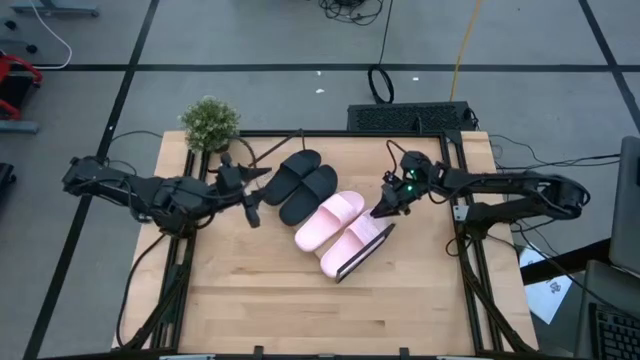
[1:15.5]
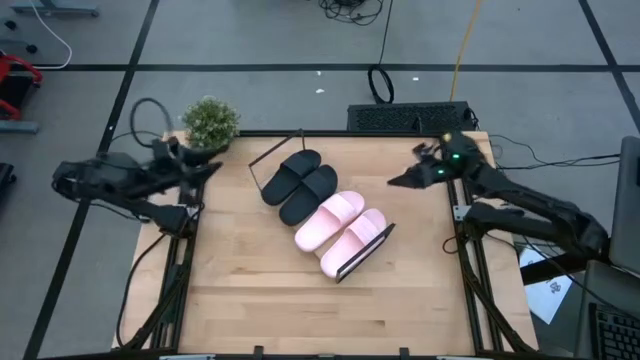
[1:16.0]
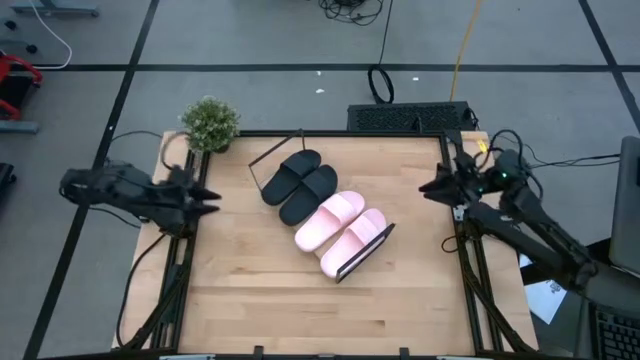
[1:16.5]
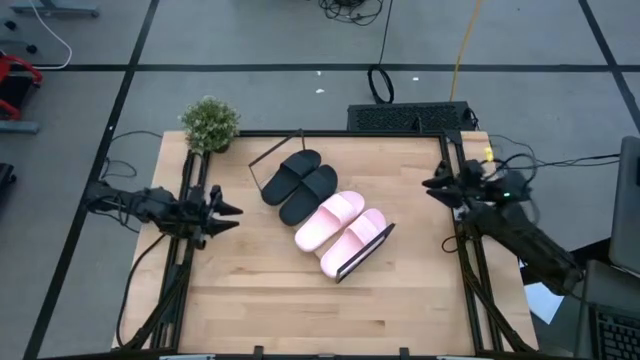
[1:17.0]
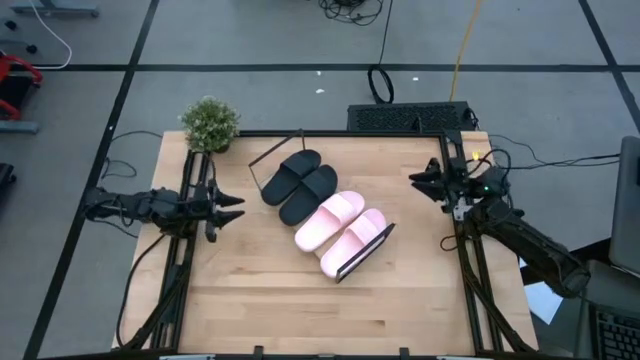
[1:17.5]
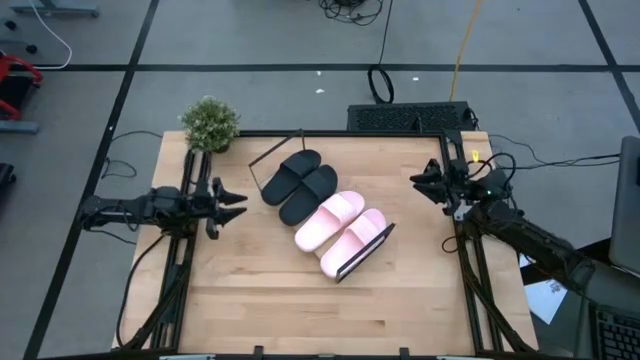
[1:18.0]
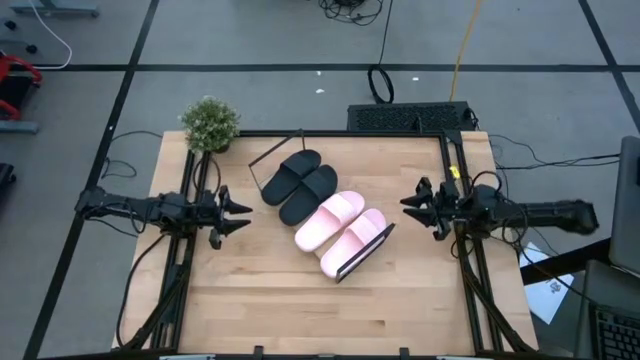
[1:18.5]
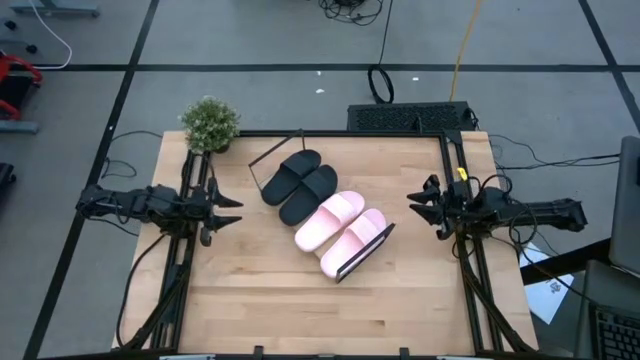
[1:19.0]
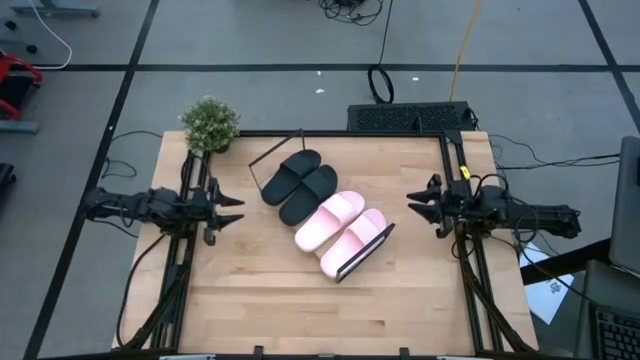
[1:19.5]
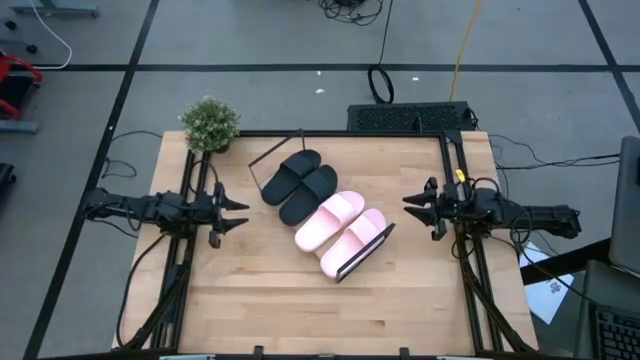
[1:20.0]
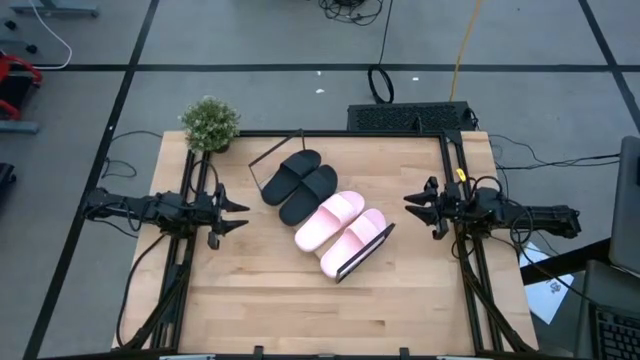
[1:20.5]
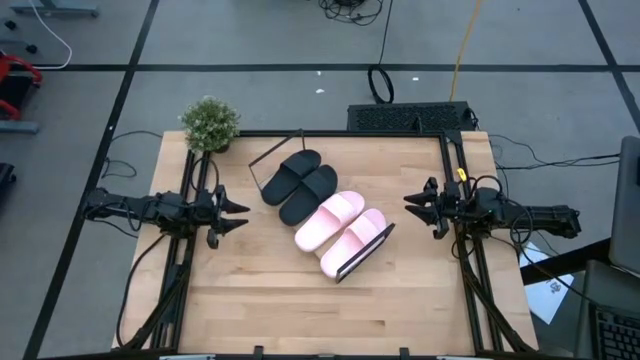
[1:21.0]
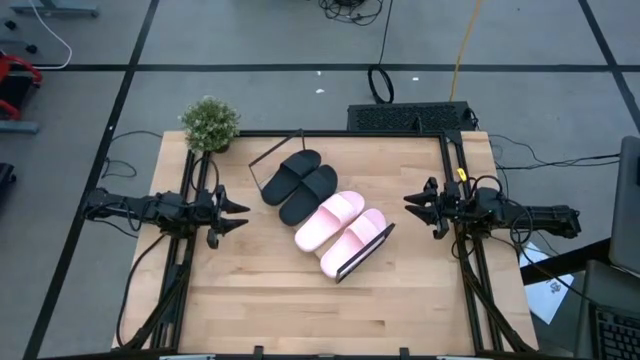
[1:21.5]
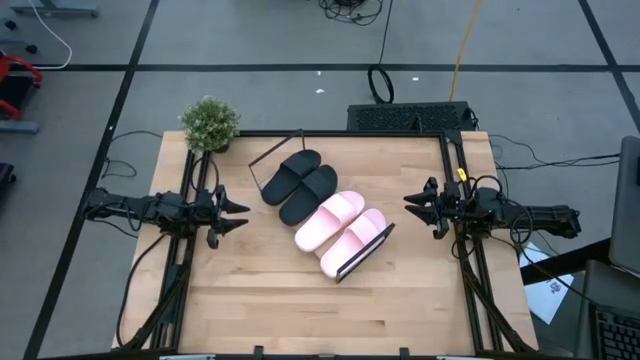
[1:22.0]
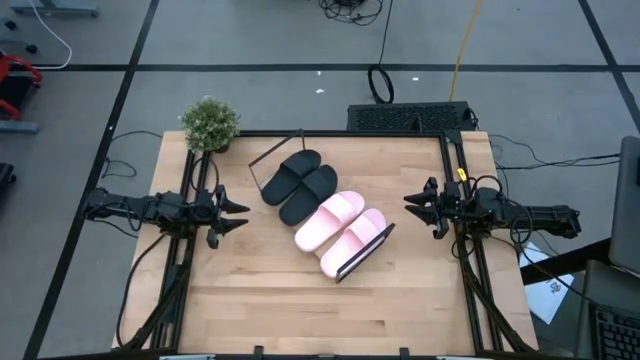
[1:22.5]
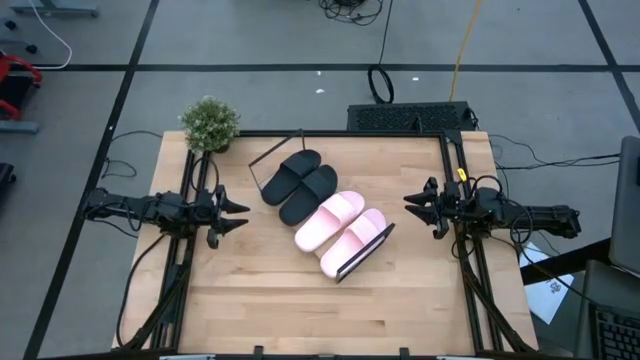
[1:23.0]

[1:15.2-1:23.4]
Task: Pick and place slides into the shelf
Return to Home Position

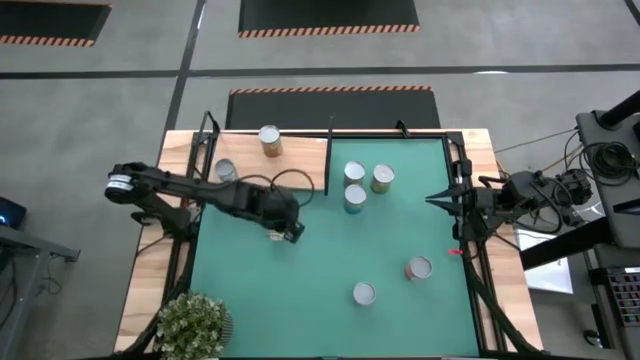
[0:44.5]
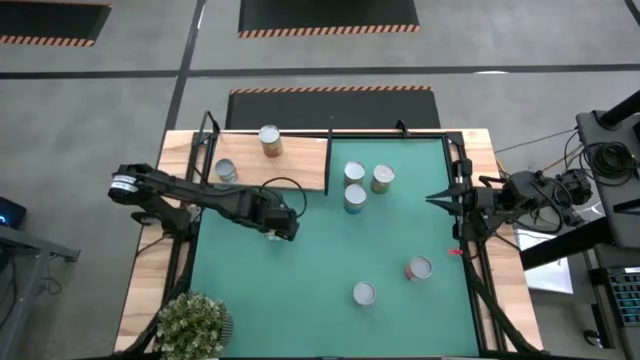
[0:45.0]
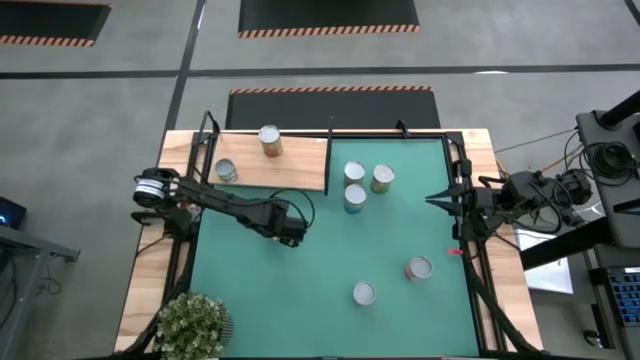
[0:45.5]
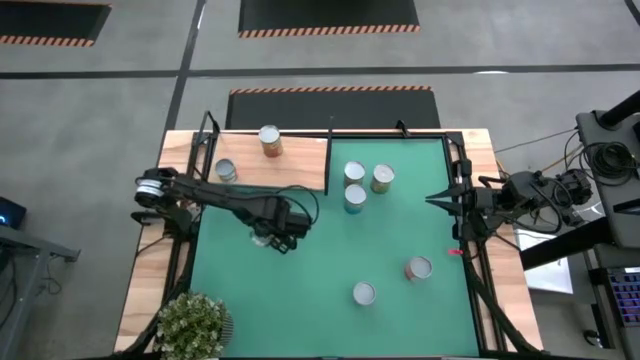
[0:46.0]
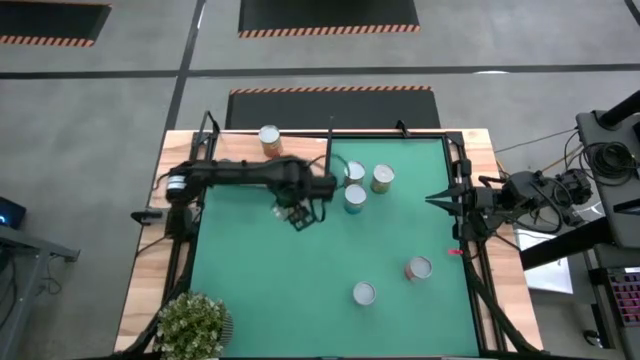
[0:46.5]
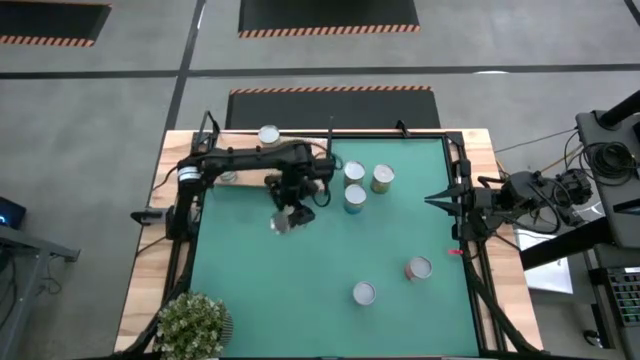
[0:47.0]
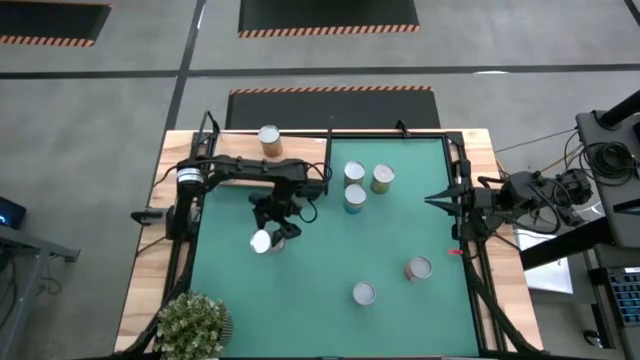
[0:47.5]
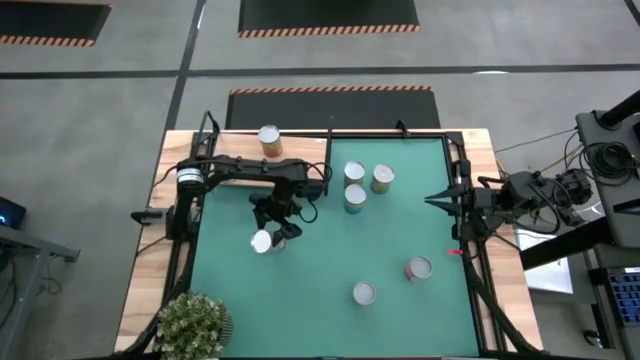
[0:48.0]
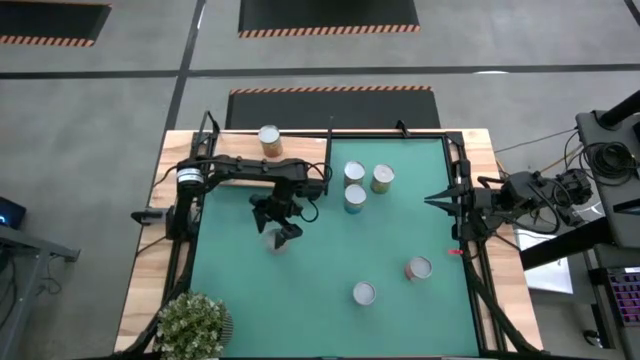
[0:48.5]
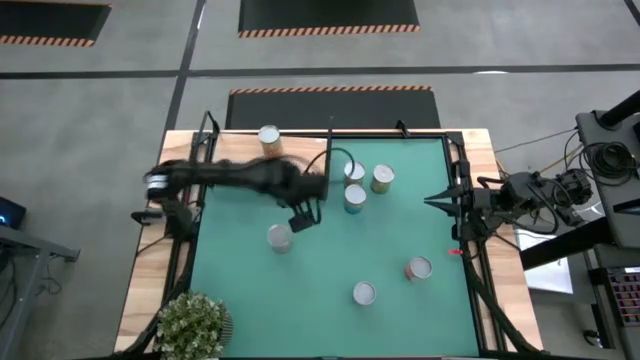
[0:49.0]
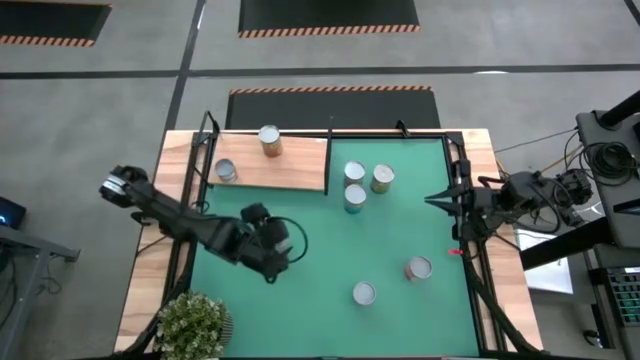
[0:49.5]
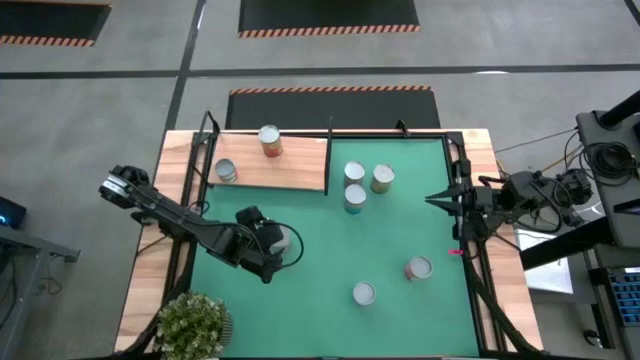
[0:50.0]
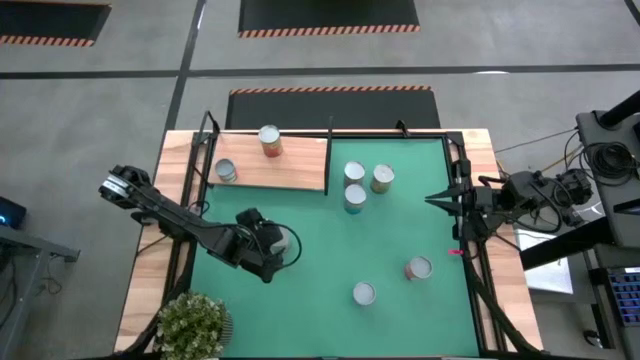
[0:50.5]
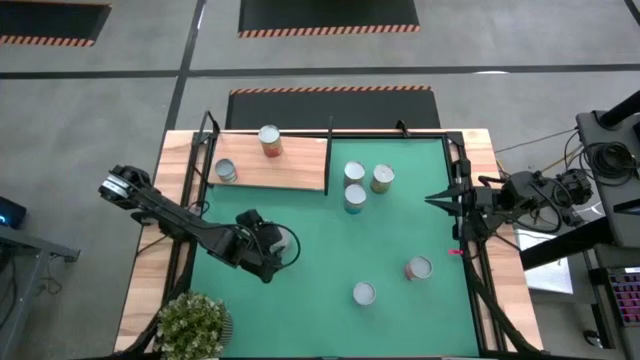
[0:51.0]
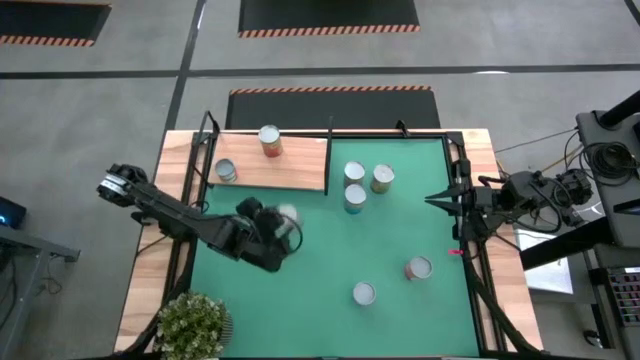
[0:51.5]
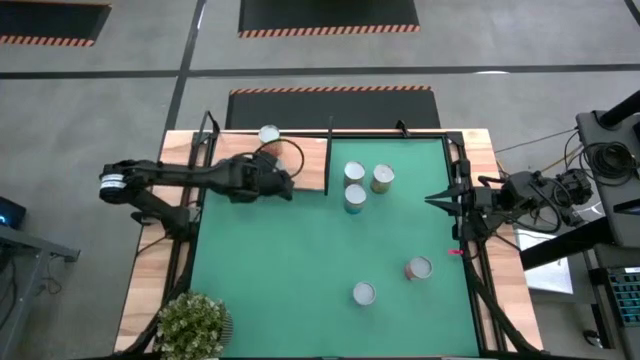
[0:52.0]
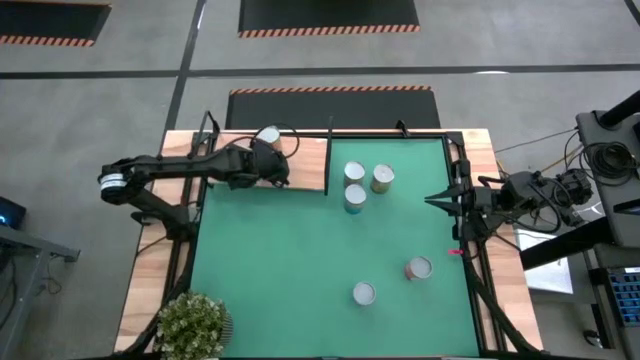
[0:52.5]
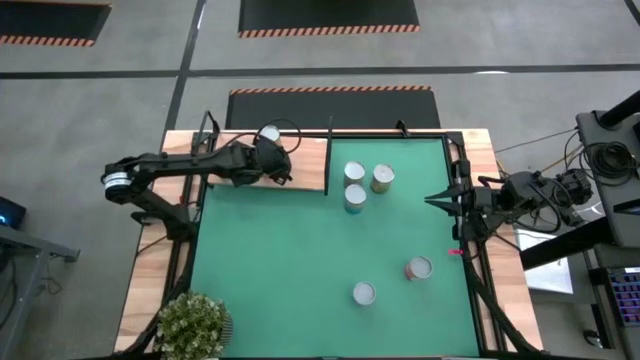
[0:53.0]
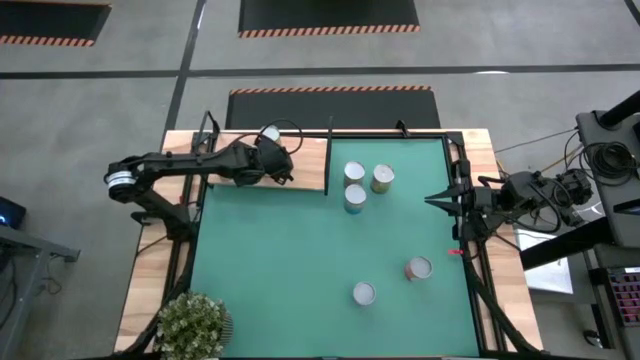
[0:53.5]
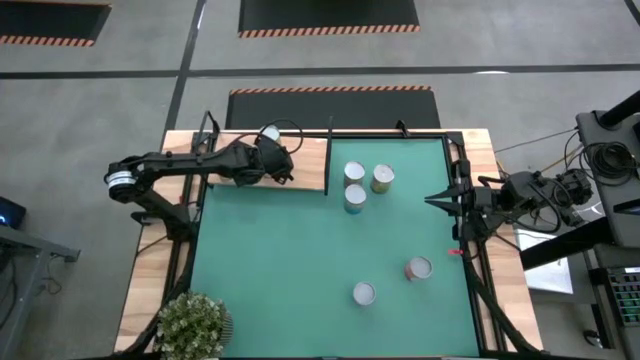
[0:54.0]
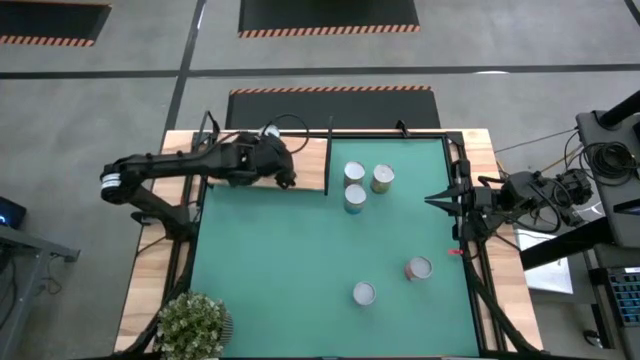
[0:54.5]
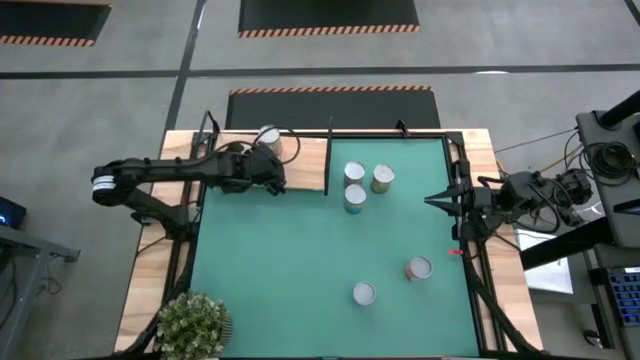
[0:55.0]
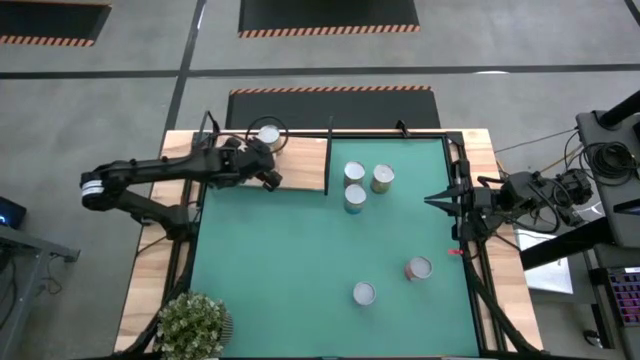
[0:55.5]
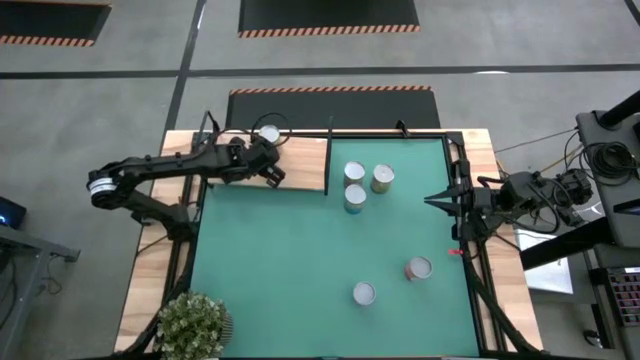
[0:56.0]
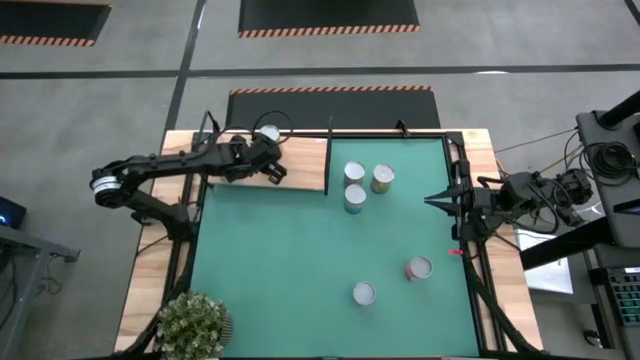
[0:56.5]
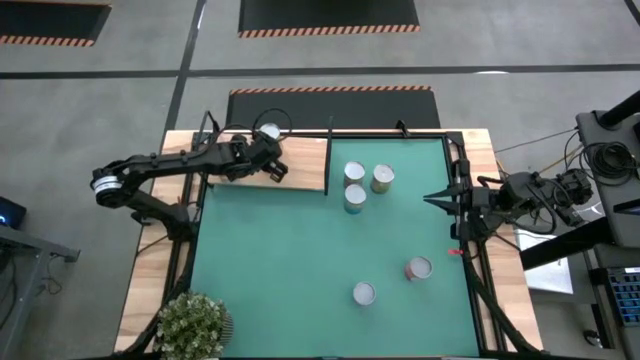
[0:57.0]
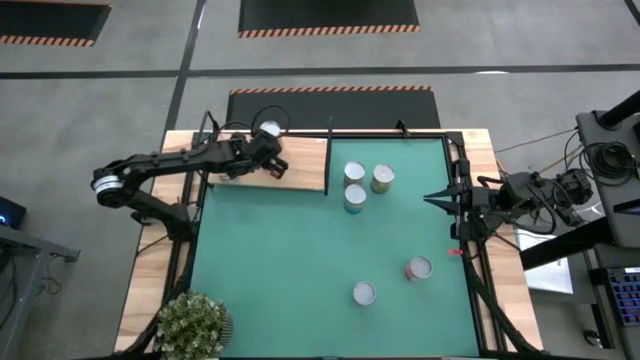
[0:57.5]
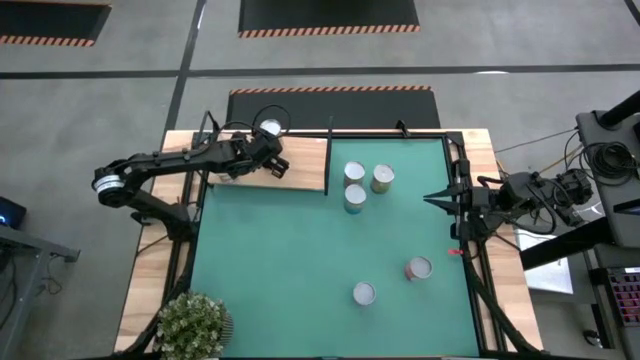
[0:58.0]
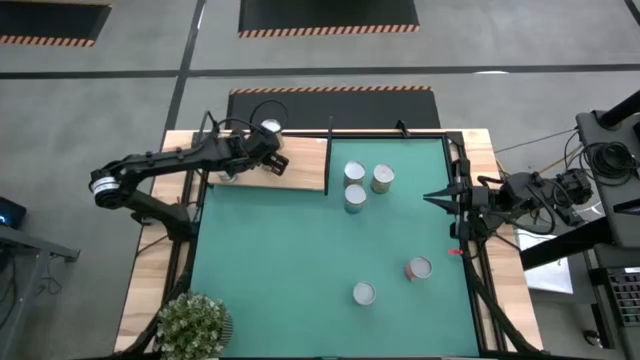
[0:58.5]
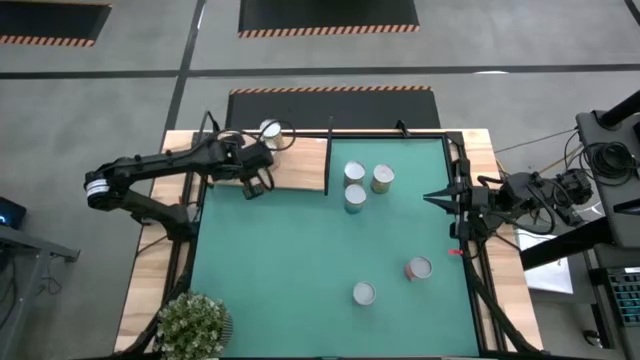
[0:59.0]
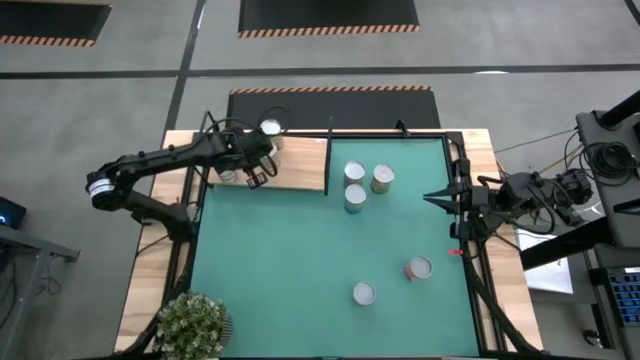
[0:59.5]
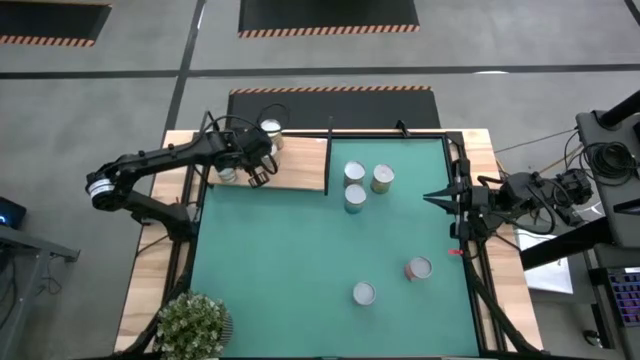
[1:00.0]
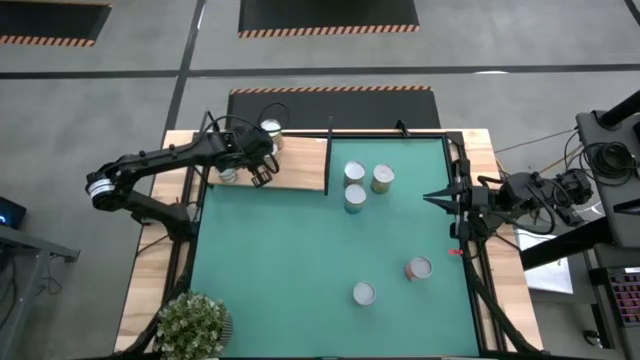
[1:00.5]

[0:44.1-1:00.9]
Task: Pick and place cans onto a shelf
Put the canned peaches on the shelf
